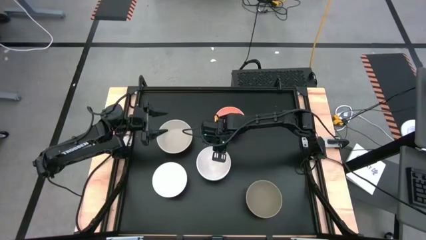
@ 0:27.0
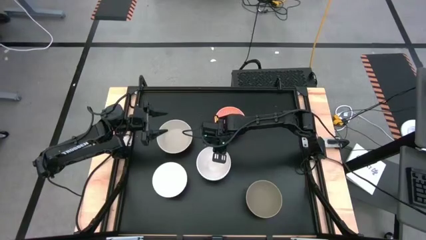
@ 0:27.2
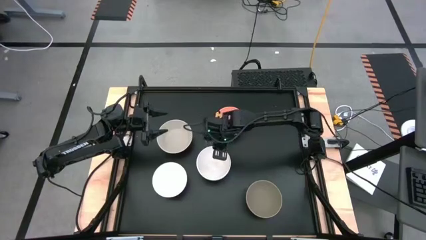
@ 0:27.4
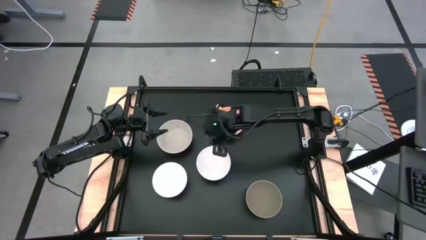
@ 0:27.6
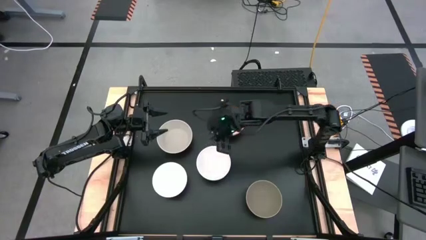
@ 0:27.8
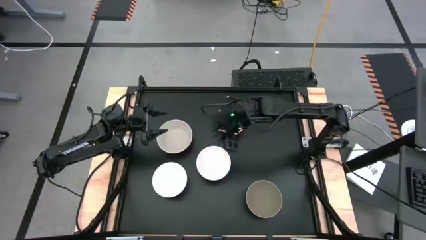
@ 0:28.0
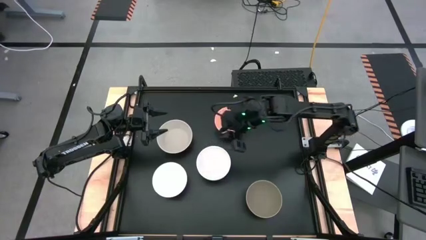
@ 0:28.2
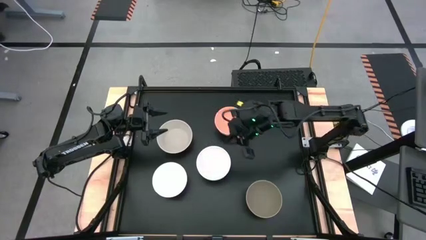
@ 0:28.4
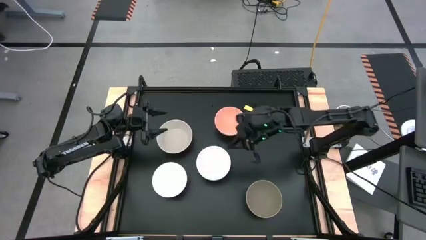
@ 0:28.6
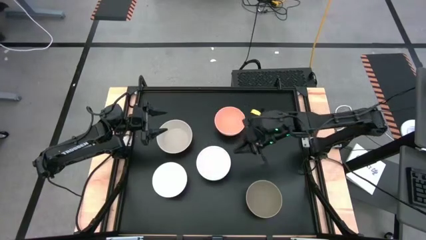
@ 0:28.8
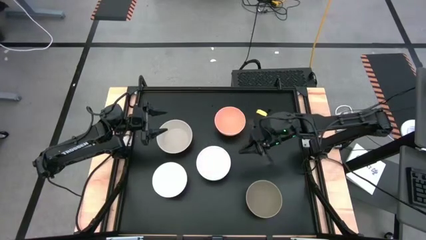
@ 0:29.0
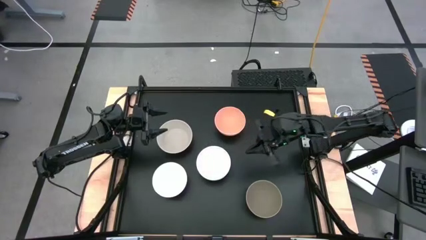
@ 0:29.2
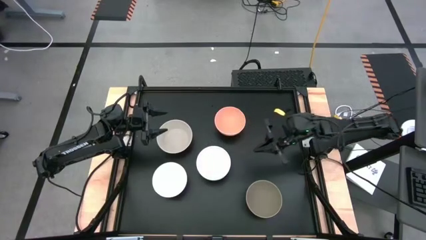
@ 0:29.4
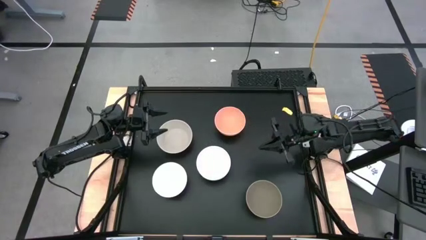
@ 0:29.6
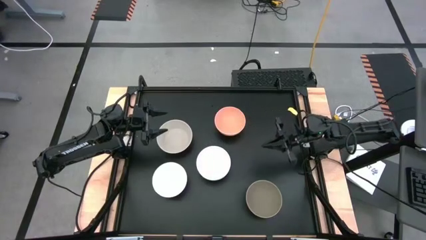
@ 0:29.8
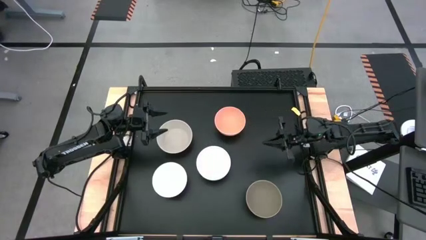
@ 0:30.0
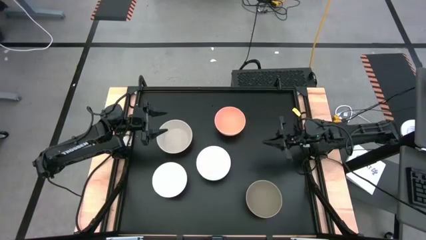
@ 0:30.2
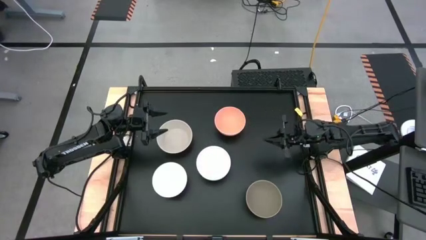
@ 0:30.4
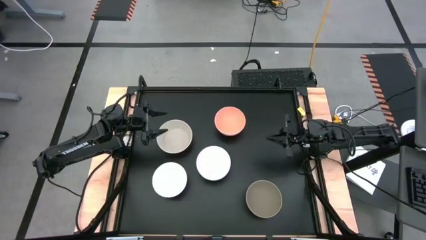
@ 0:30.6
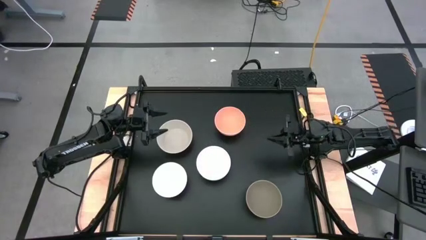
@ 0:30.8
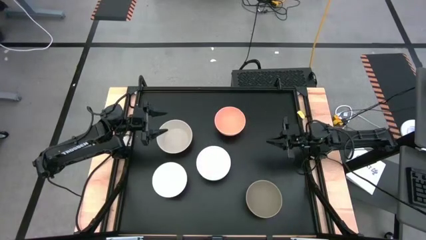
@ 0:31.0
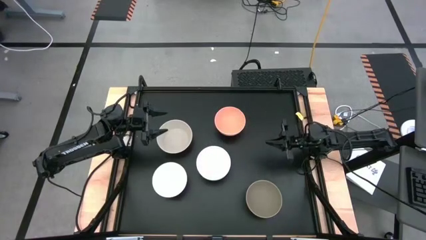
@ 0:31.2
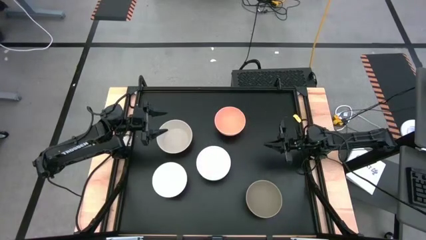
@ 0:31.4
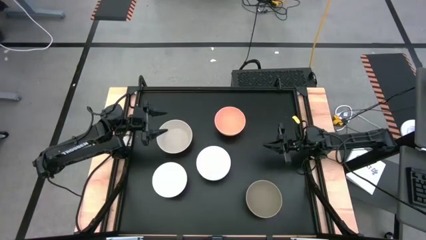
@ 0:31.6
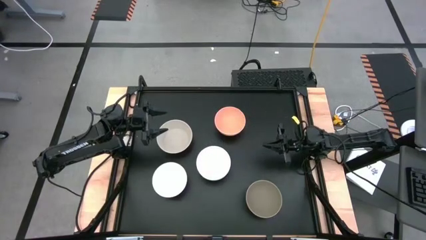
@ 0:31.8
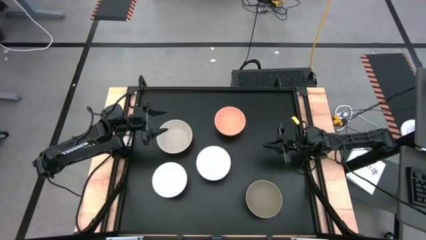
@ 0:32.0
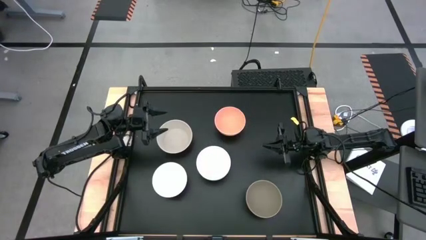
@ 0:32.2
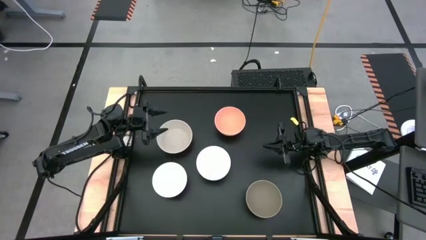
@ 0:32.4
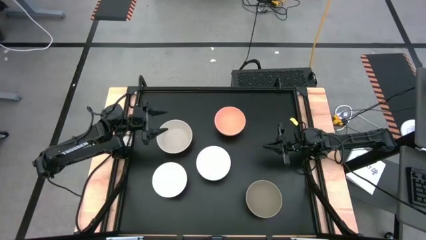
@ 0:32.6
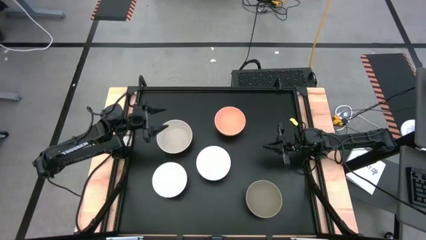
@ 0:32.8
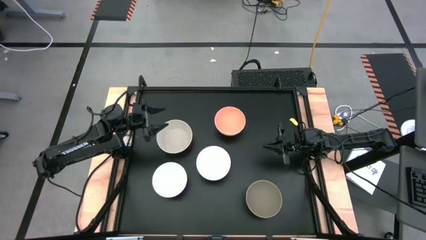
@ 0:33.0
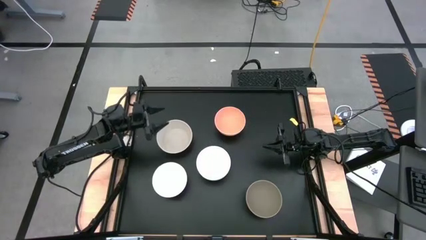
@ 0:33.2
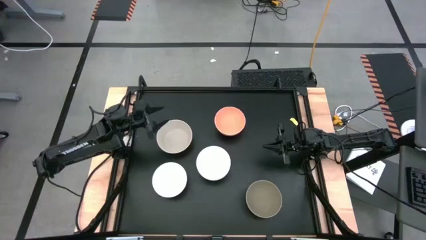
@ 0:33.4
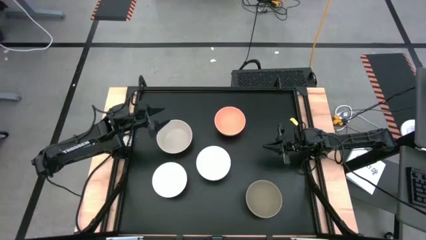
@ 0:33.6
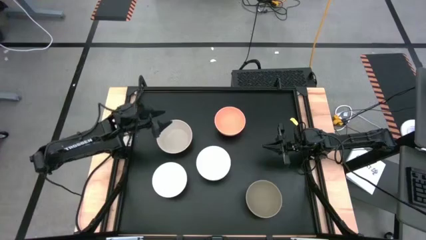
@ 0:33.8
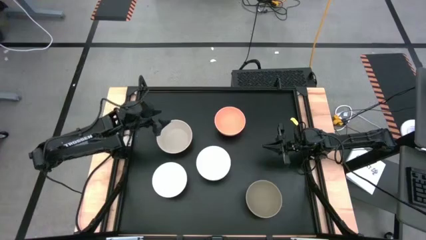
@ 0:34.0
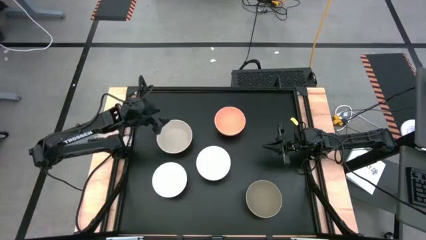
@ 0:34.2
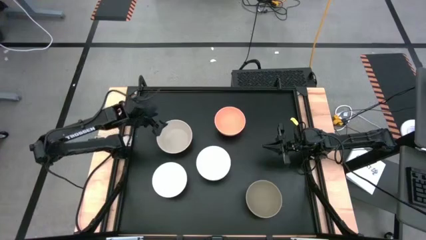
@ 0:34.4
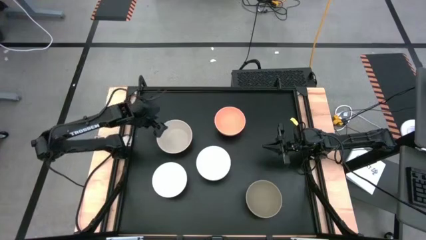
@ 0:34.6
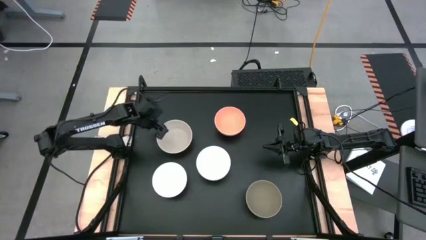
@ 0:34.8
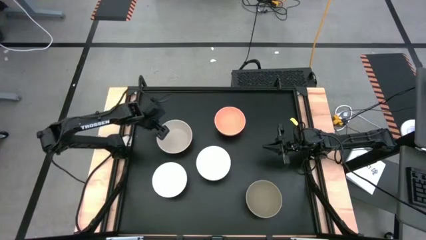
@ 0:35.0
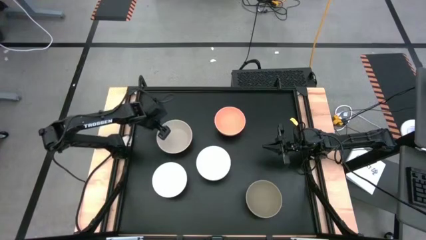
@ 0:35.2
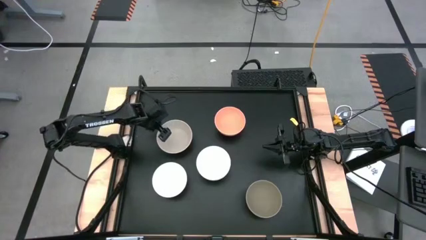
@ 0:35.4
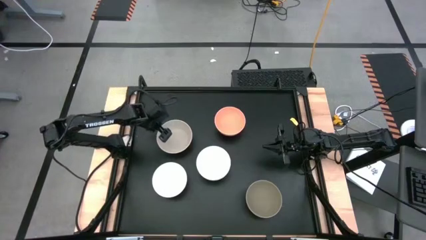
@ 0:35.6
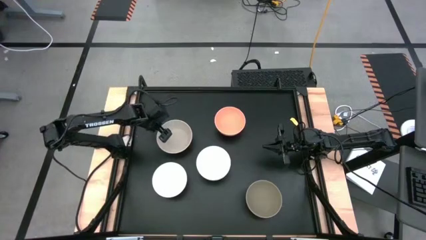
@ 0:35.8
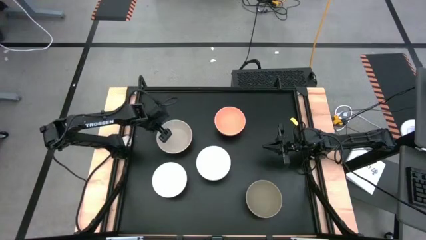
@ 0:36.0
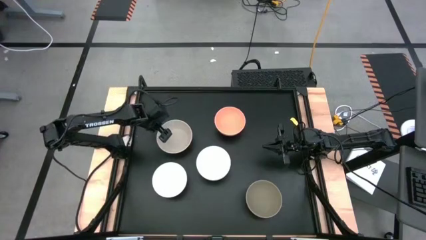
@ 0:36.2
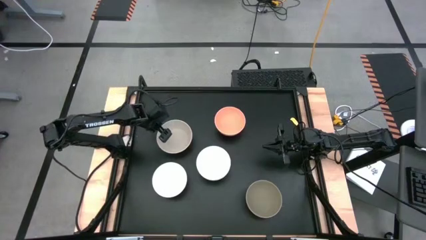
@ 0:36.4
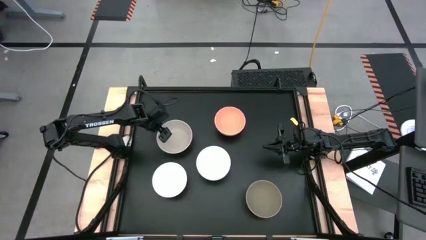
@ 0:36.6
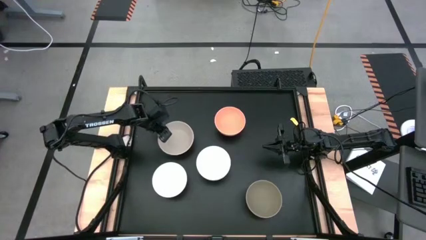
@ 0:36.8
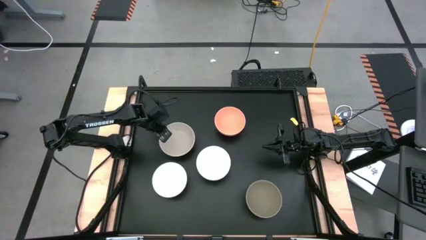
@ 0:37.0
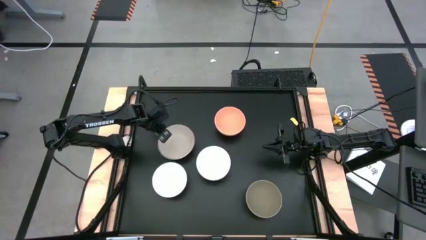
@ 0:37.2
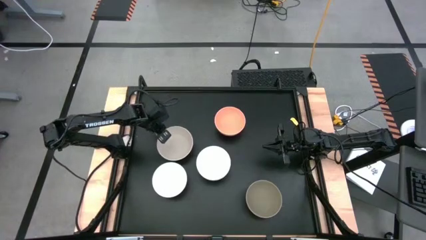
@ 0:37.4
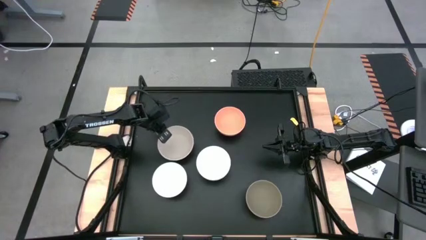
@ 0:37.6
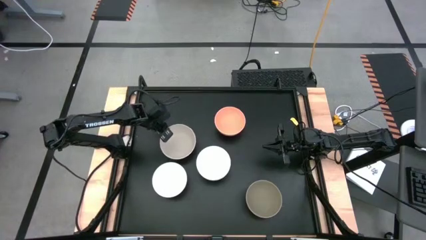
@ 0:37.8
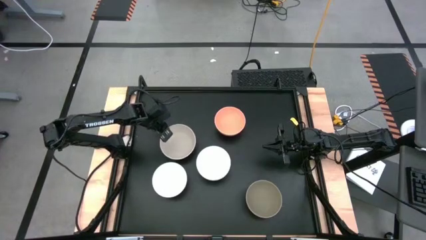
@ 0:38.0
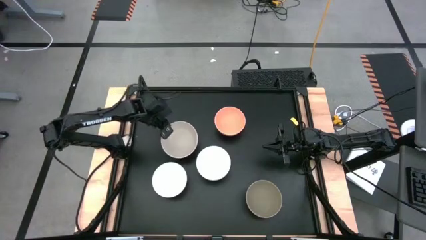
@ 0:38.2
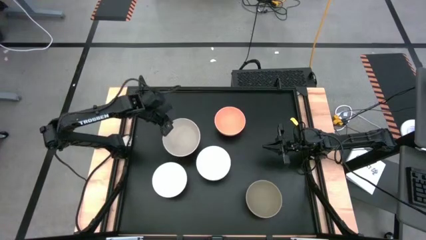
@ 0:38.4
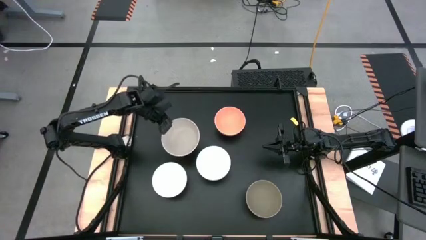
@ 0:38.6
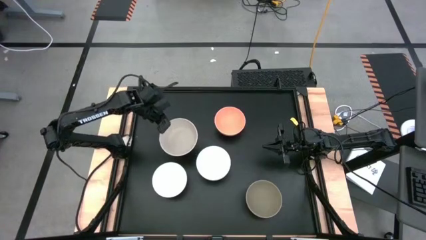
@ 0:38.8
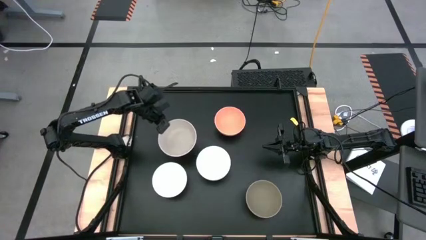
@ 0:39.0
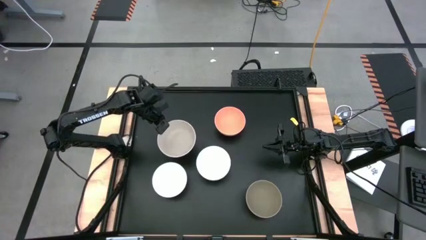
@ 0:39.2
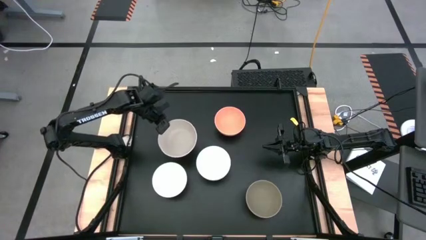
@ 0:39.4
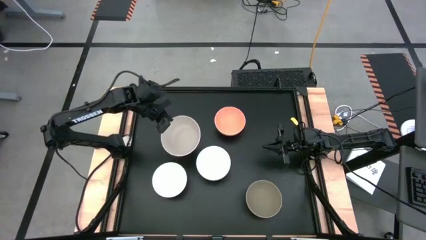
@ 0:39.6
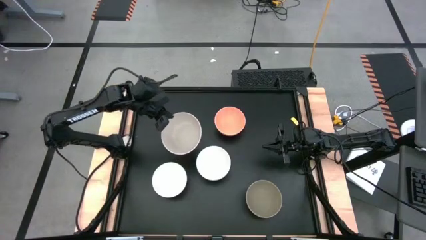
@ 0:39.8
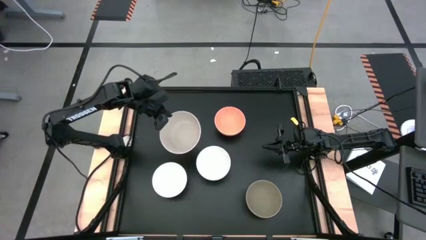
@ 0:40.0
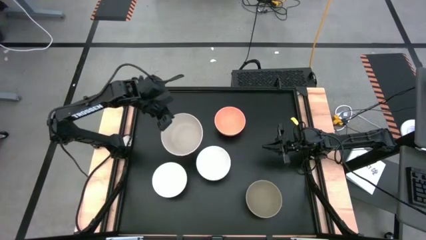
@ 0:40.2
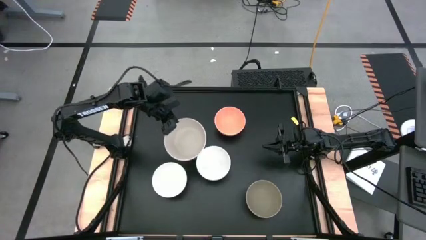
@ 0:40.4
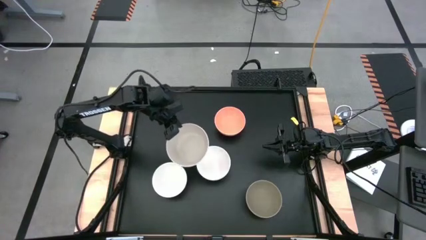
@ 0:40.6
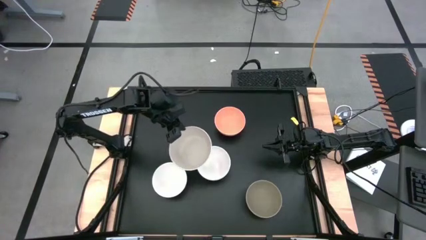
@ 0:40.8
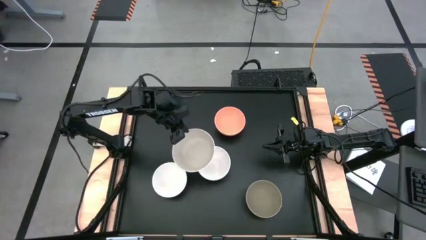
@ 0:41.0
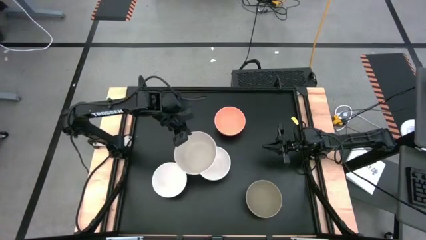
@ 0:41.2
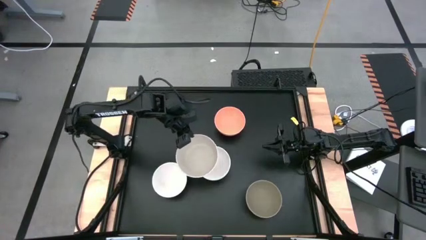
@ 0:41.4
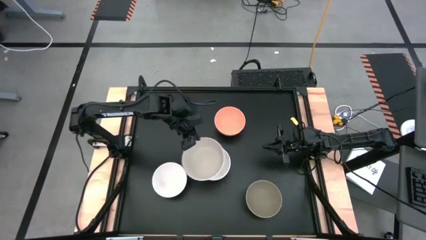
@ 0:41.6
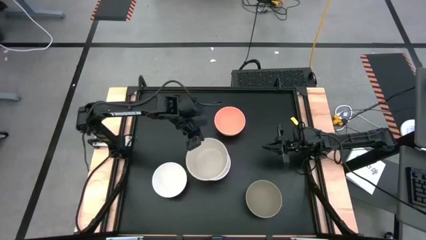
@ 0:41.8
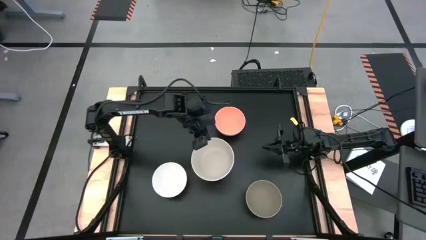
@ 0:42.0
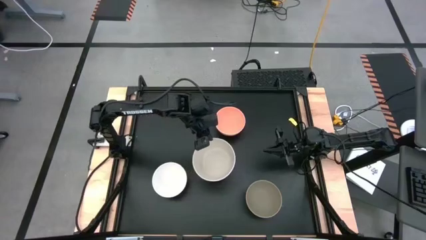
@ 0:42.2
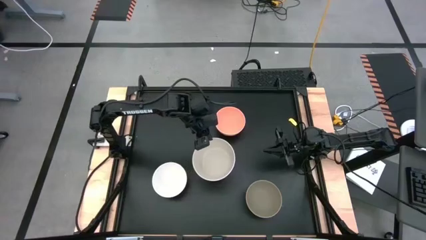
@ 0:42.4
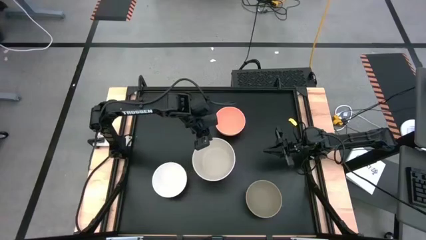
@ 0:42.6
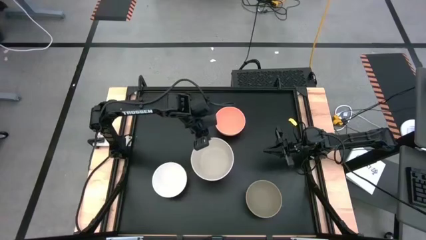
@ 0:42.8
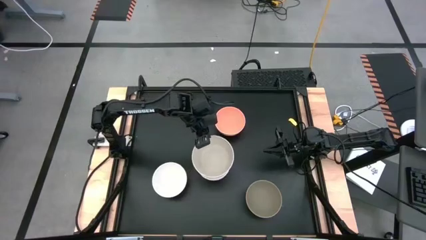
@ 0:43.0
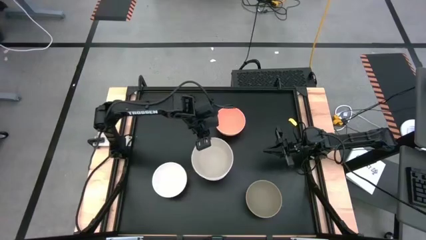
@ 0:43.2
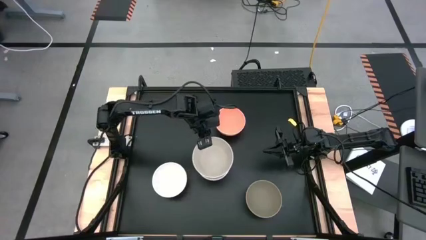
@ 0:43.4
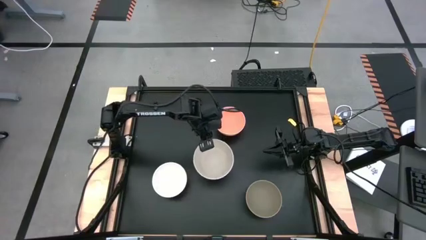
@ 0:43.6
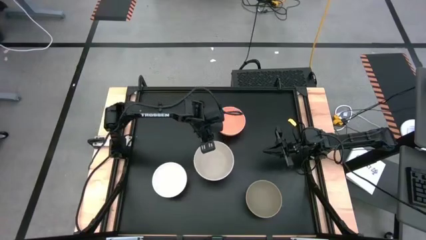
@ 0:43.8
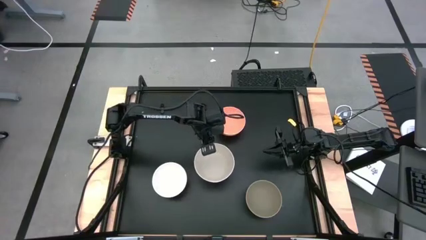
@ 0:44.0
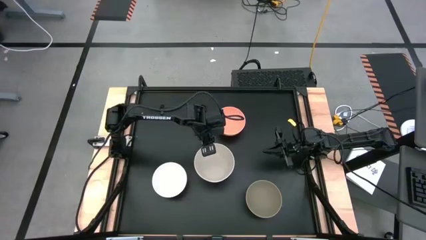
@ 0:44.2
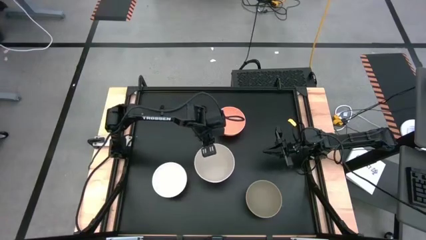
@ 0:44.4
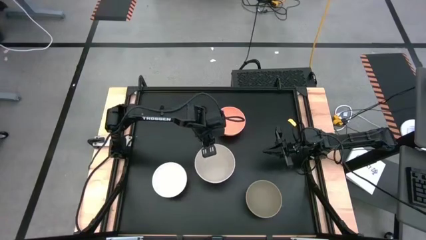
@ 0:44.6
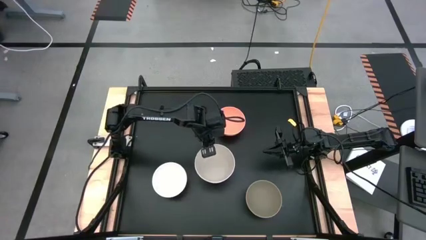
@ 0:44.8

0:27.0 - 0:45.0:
Task: Nest bowls inside each other
Stack the gray bowl on the right white bowl
